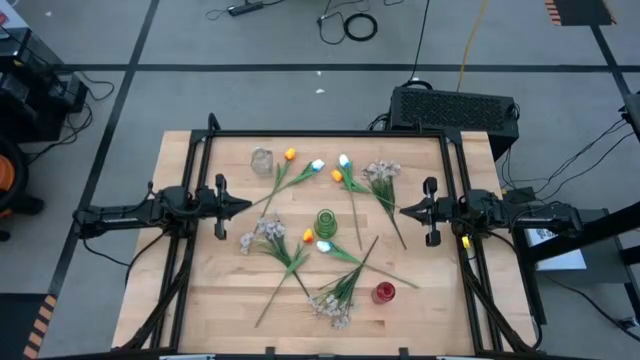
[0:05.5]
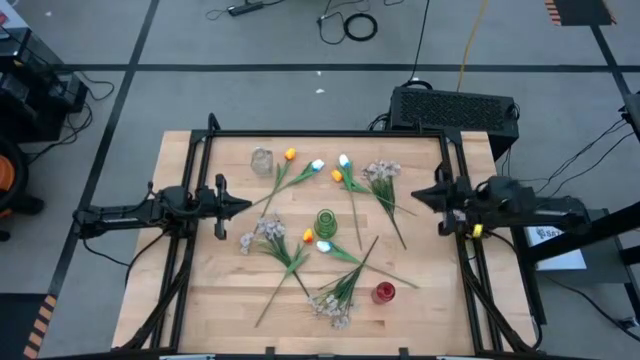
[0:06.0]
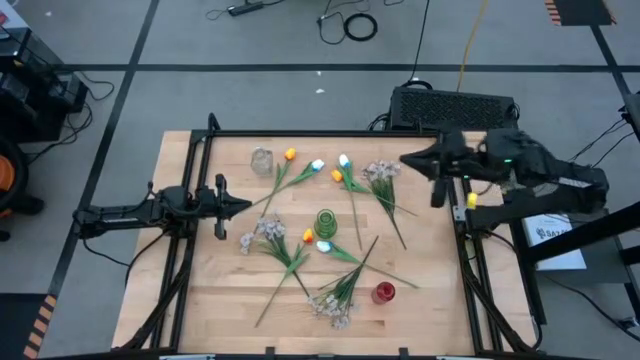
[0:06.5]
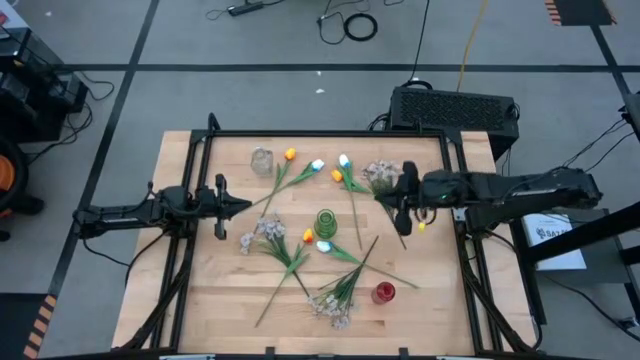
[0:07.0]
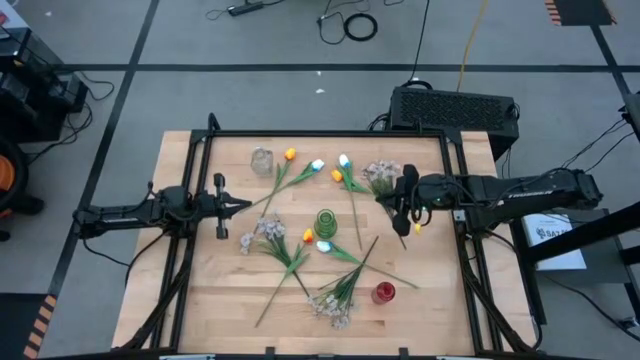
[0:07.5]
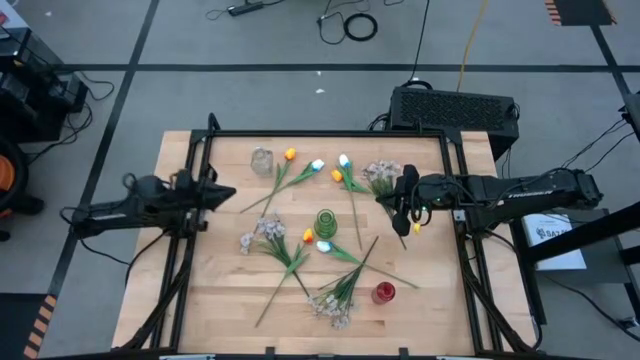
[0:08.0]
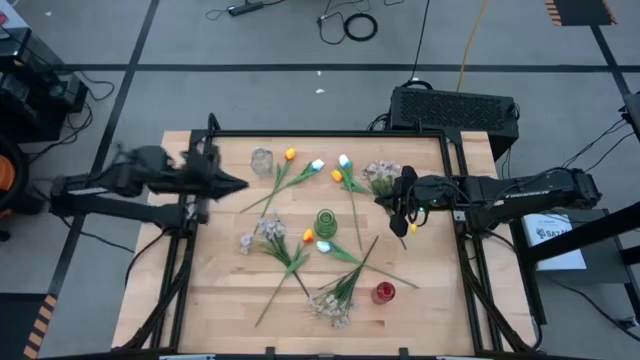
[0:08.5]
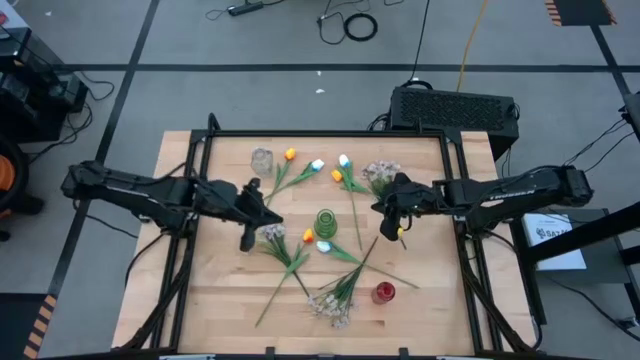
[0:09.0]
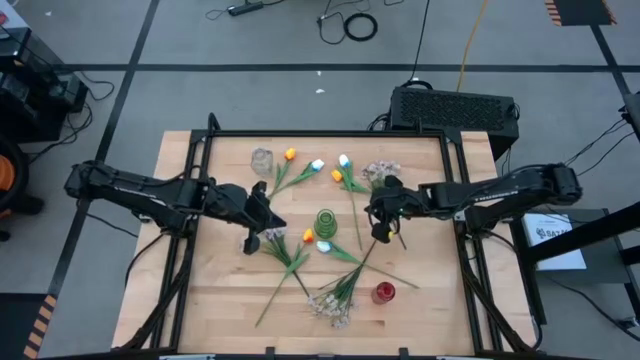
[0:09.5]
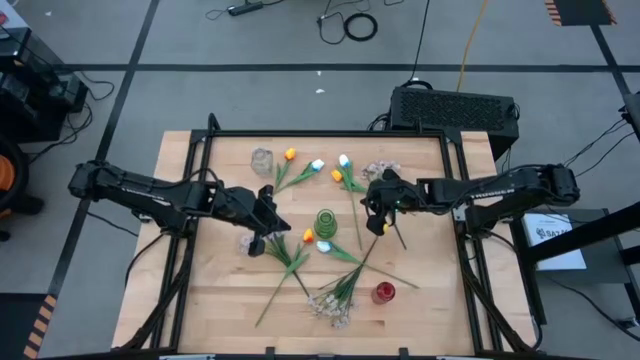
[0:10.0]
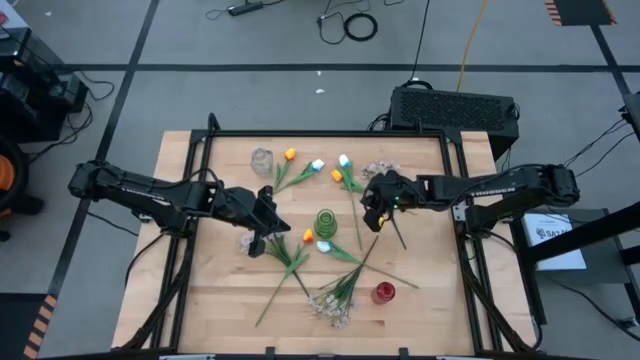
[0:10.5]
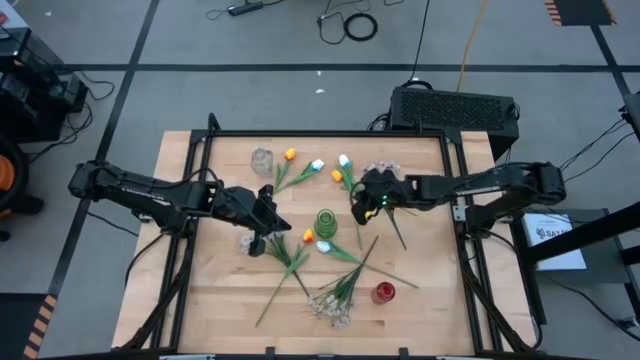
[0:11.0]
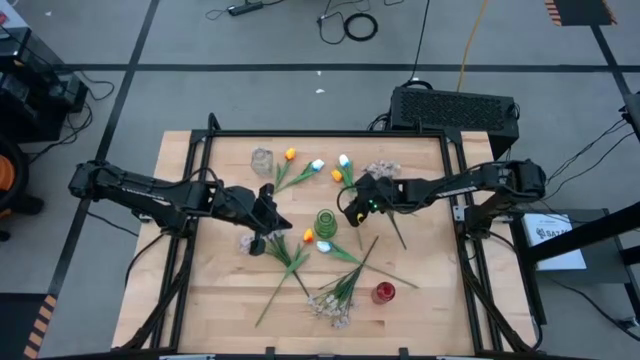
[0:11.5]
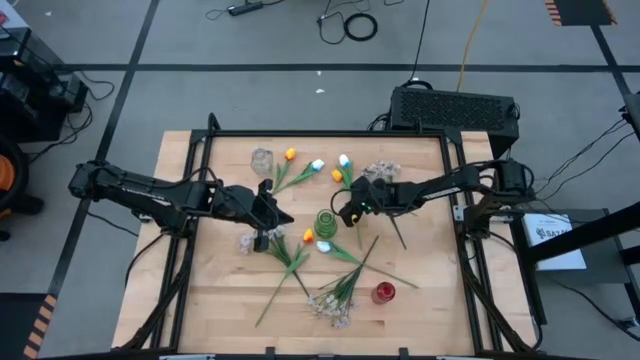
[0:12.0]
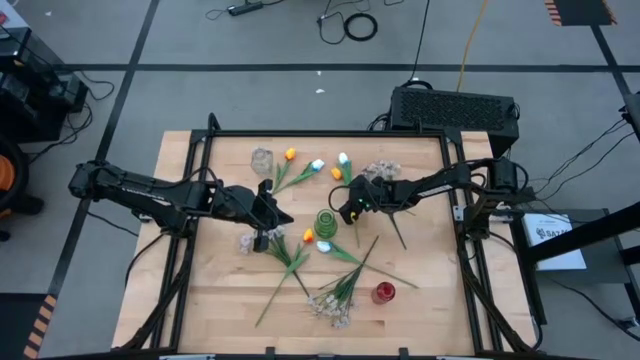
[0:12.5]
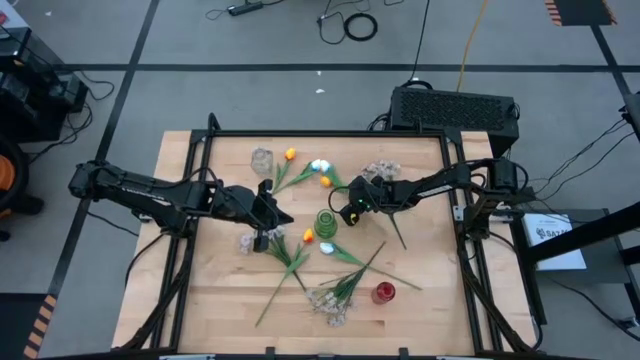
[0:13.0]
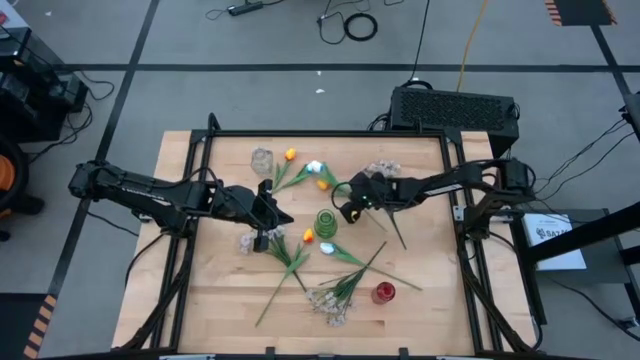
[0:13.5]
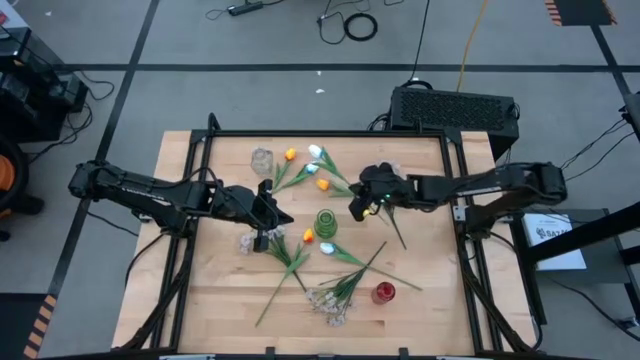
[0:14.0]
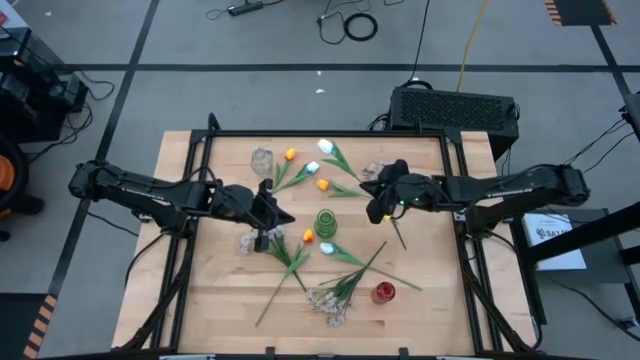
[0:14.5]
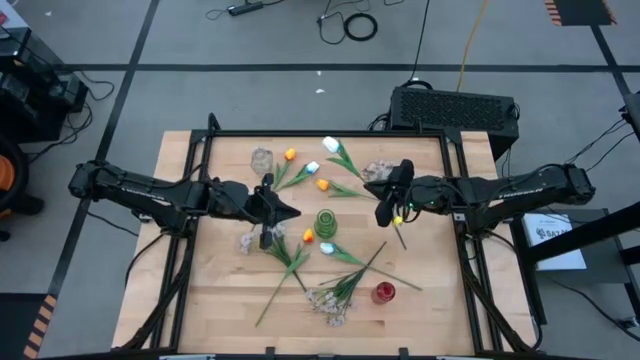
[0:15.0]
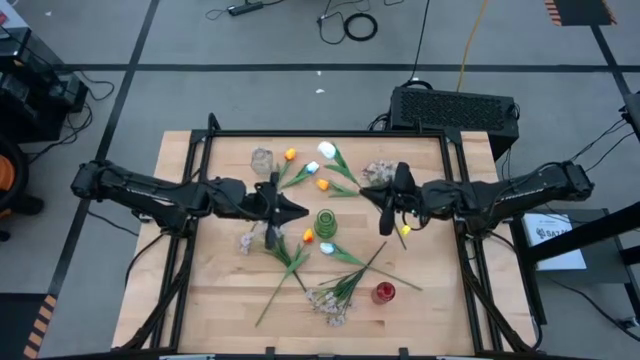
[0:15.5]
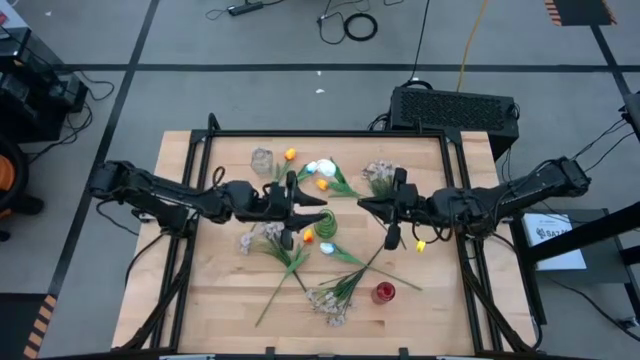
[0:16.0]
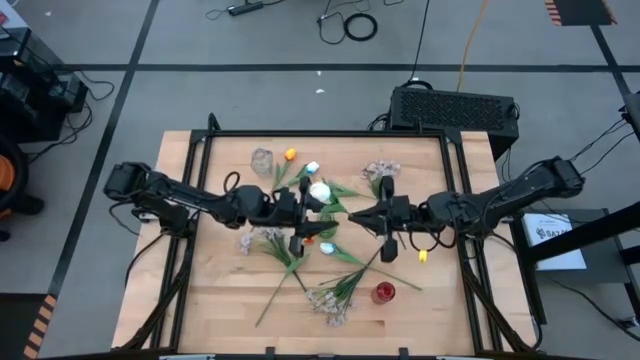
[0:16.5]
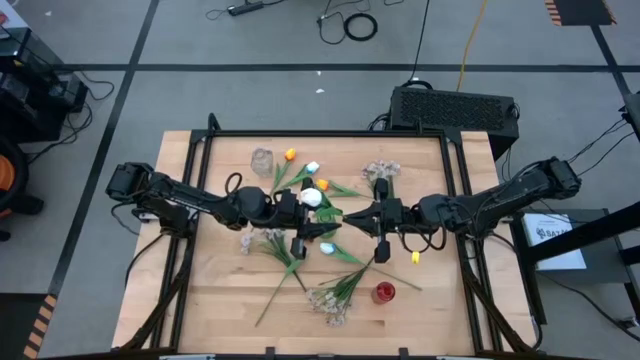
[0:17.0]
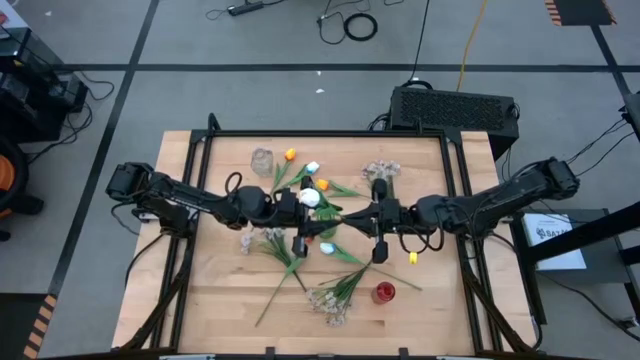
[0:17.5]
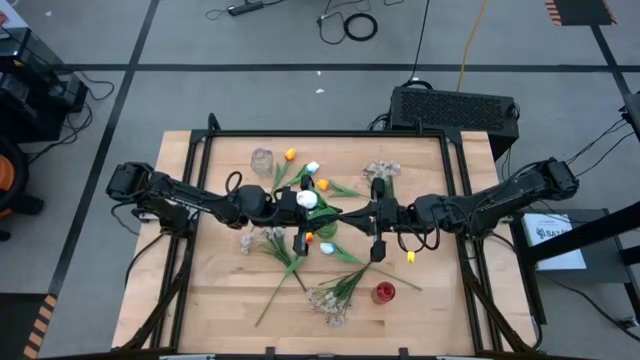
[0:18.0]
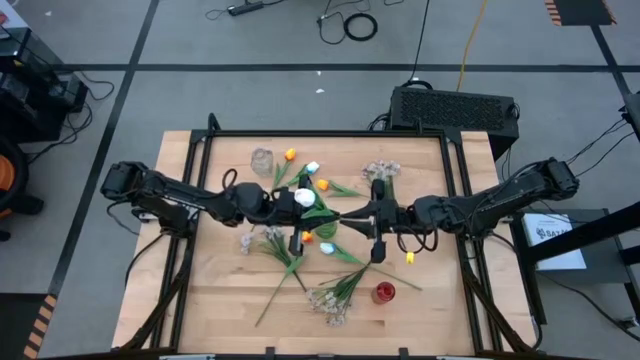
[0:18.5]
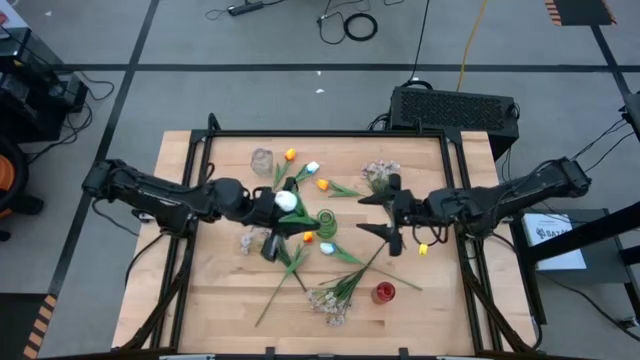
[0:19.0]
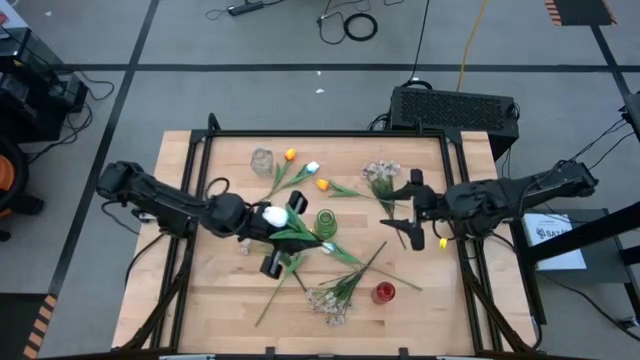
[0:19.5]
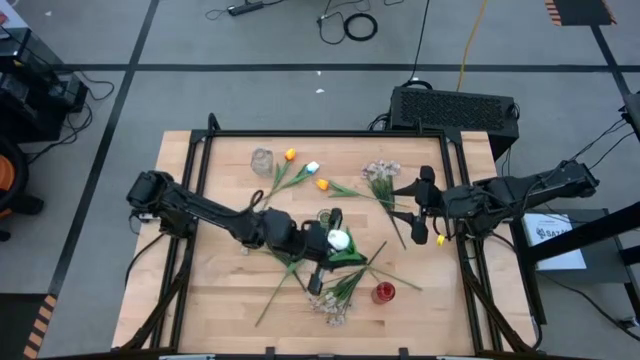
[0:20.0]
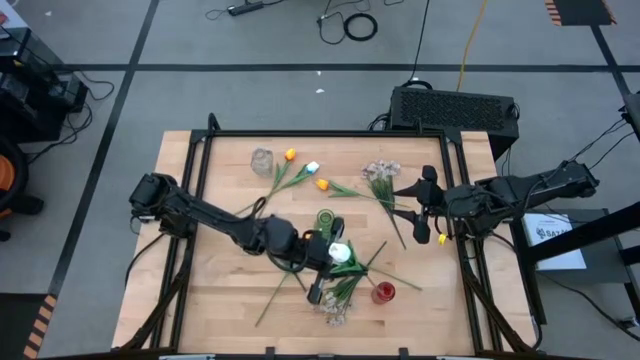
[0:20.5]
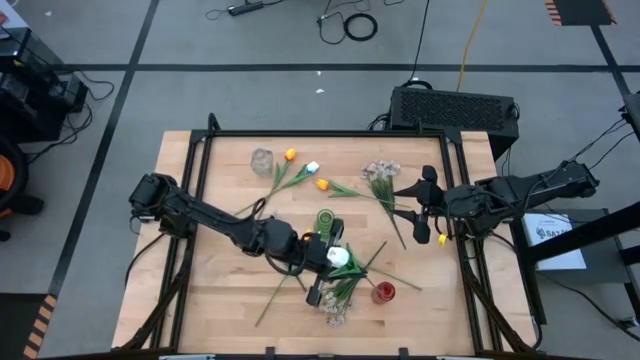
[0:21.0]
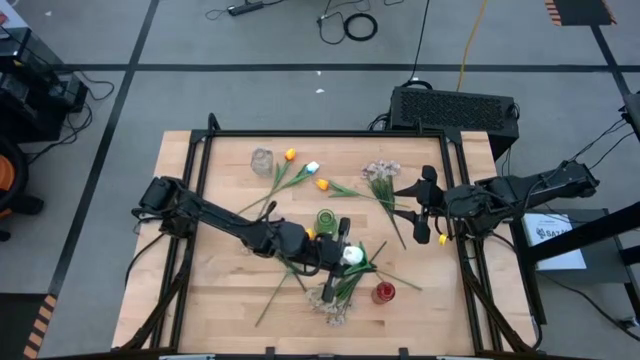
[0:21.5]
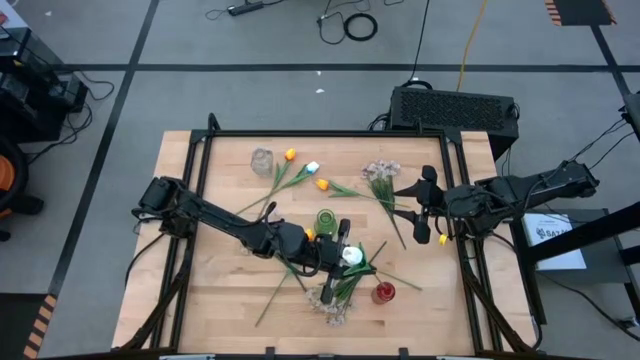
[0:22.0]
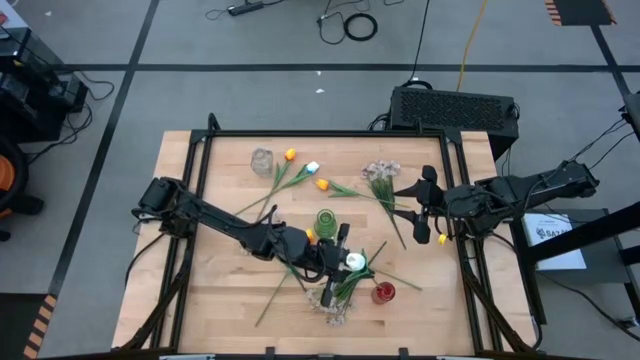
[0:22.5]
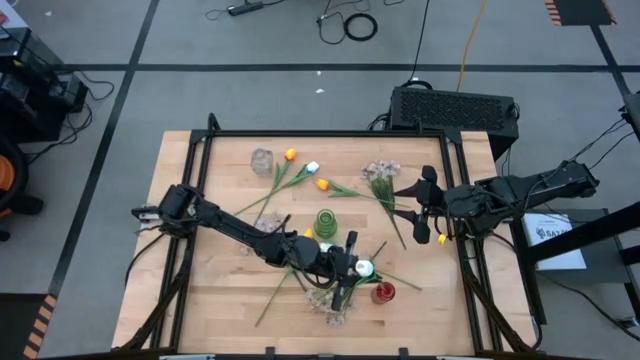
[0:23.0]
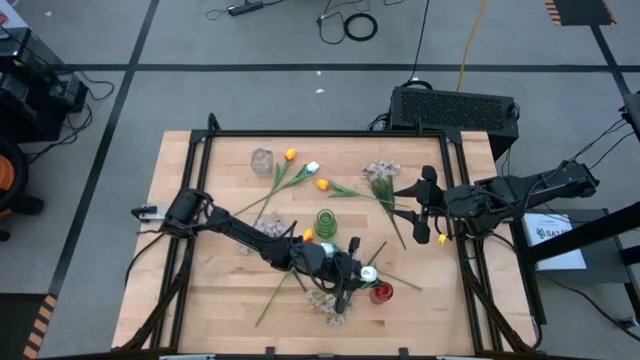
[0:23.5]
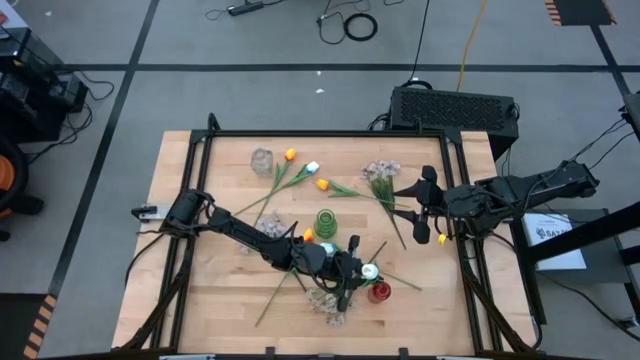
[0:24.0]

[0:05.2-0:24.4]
Task: Sort flowers into vase by color
Put the top right white tulip into the red vase

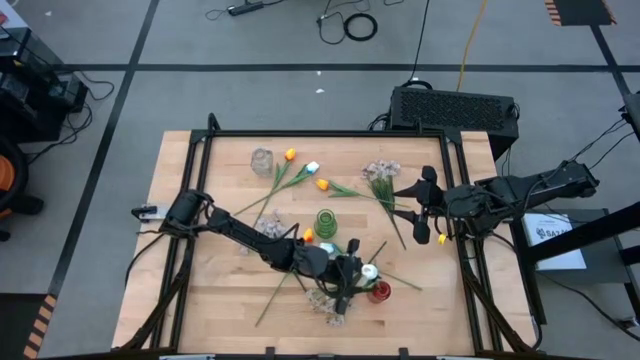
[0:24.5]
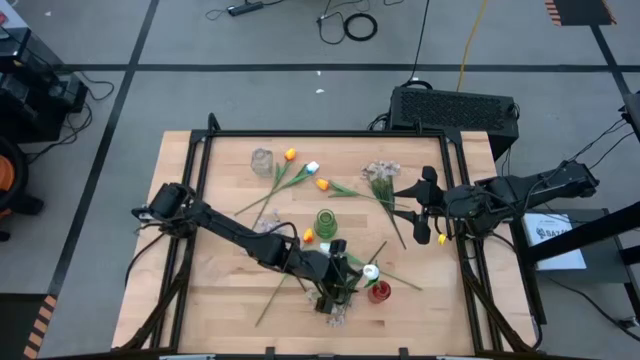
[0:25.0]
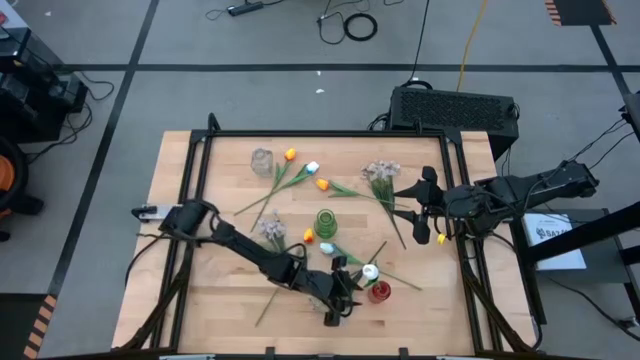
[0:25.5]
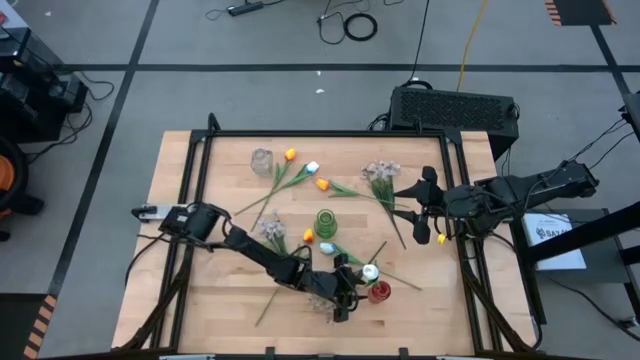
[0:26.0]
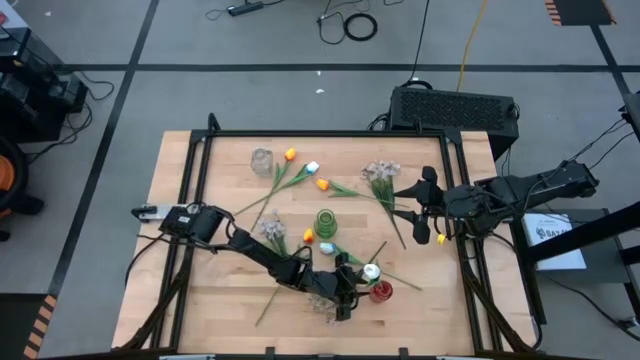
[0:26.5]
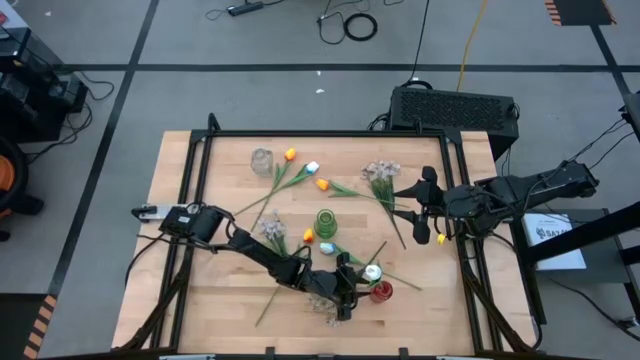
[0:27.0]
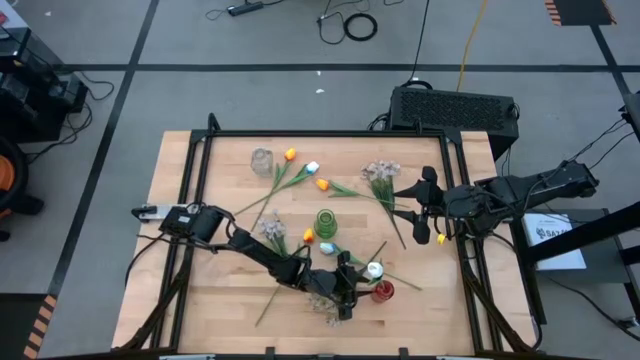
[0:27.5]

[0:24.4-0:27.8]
Adjust the red vase
